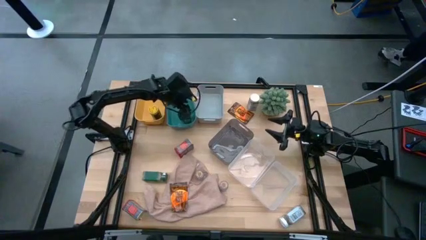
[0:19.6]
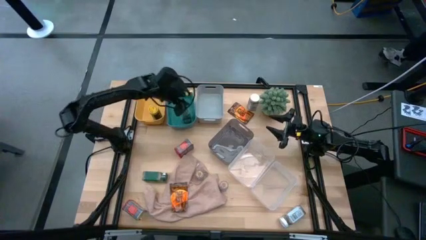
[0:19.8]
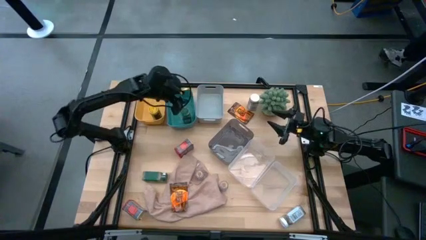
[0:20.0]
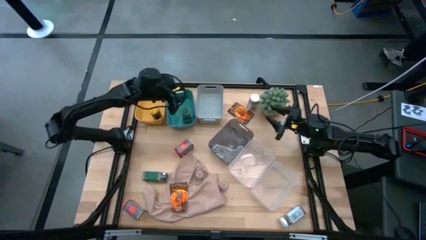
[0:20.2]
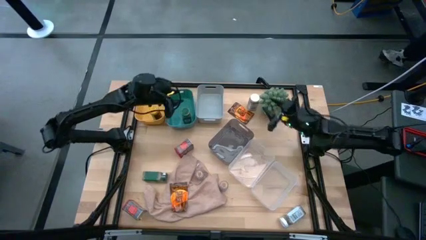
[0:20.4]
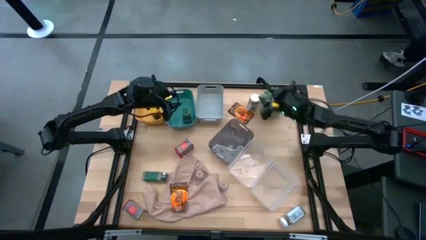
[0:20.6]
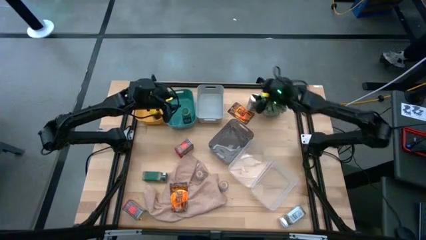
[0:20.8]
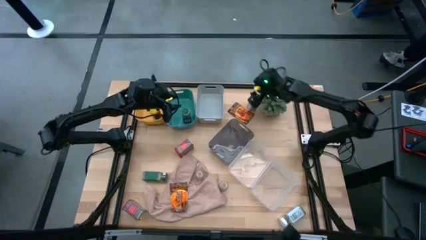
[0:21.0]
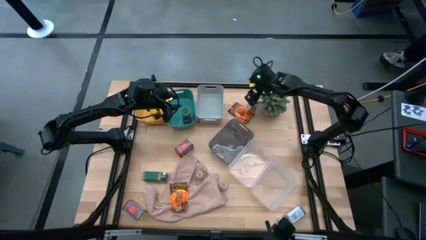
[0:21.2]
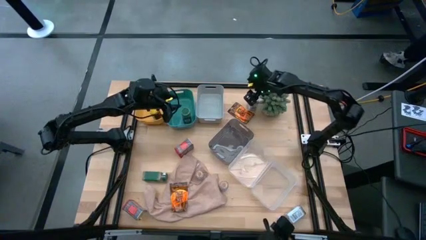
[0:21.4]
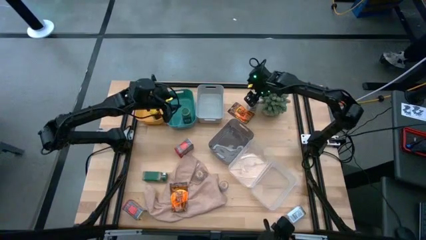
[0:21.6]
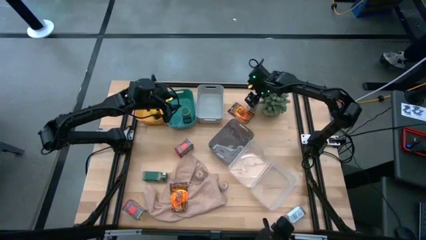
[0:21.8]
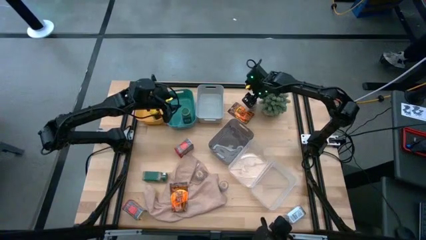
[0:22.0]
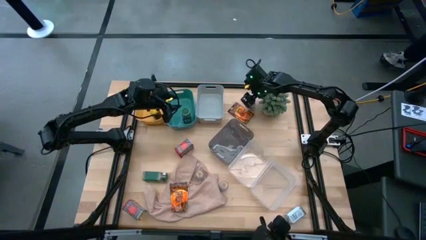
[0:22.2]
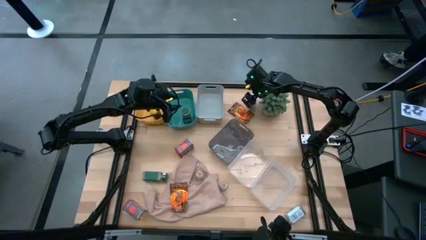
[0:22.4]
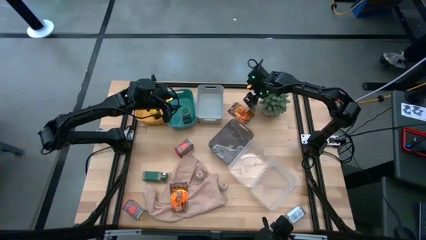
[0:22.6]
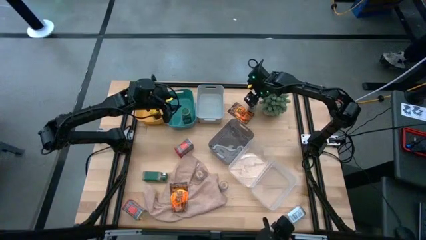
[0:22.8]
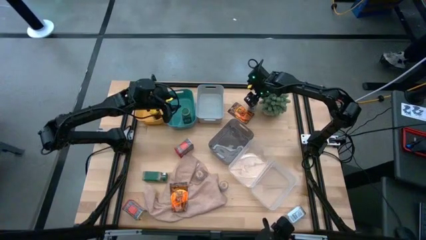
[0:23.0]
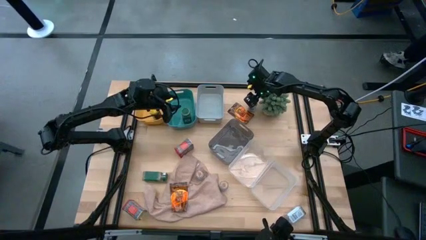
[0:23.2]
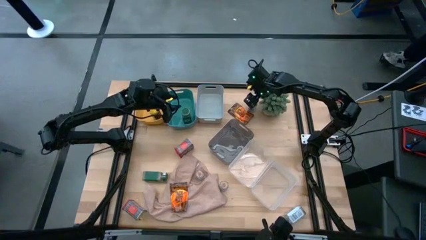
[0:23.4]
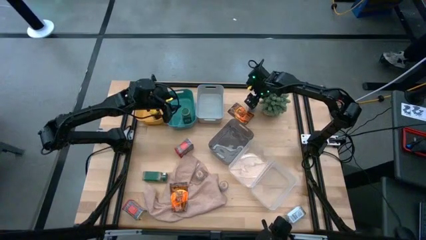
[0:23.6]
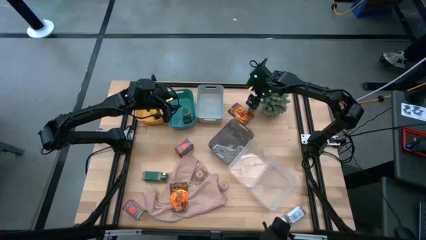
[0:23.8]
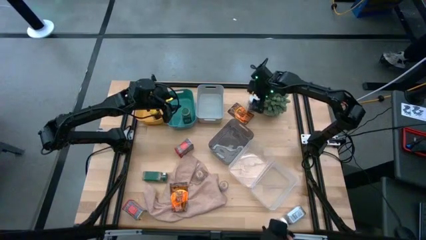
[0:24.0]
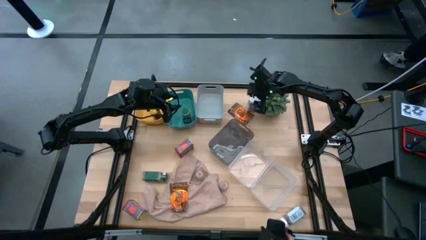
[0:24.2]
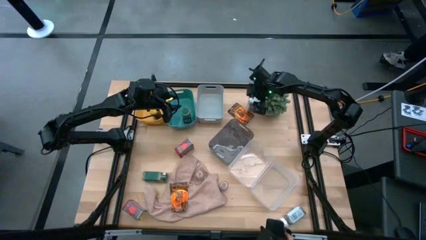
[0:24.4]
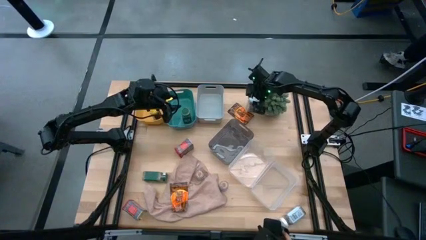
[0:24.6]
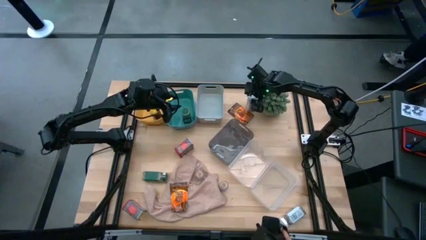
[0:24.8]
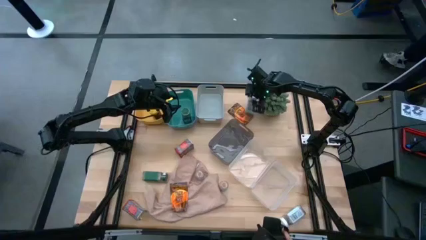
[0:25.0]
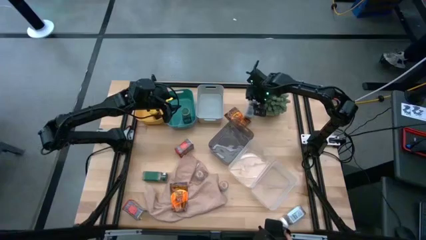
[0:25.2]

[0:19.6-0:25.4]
Task: Sort spices by type
Put the top white seasoning bottle into the gray bin

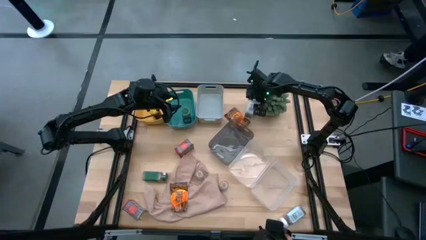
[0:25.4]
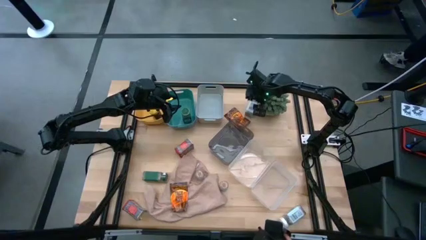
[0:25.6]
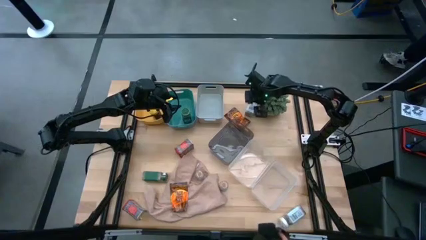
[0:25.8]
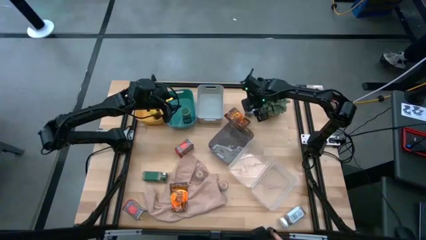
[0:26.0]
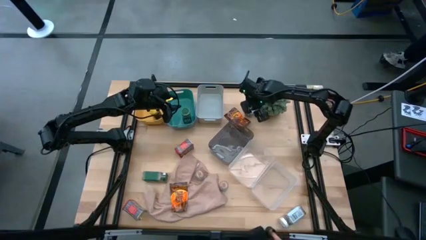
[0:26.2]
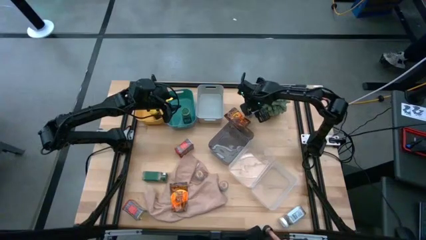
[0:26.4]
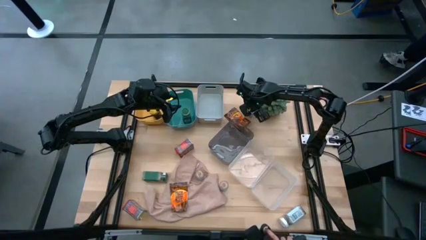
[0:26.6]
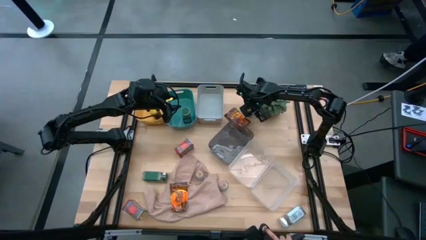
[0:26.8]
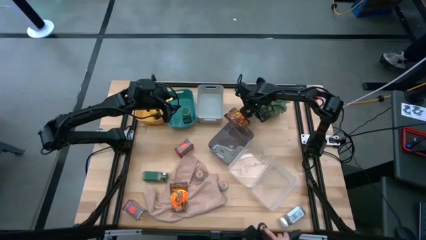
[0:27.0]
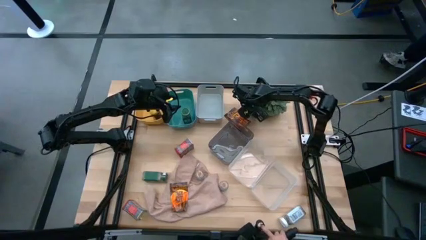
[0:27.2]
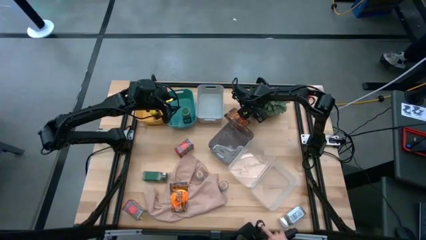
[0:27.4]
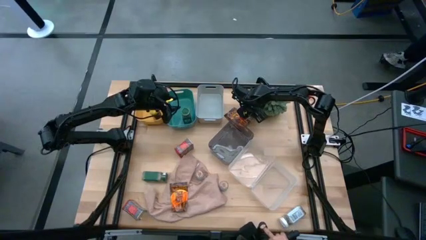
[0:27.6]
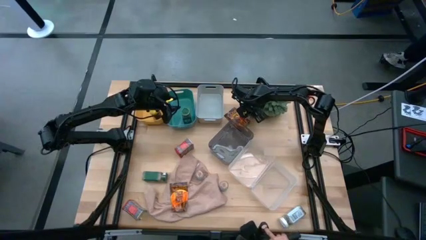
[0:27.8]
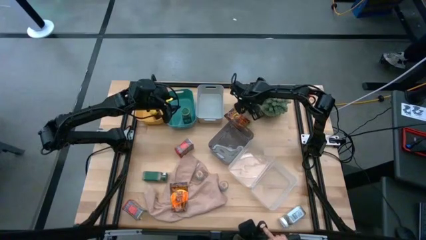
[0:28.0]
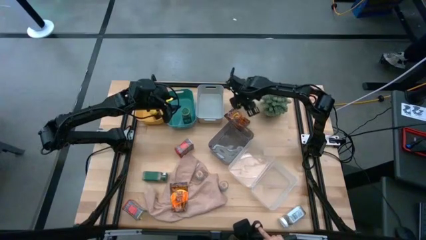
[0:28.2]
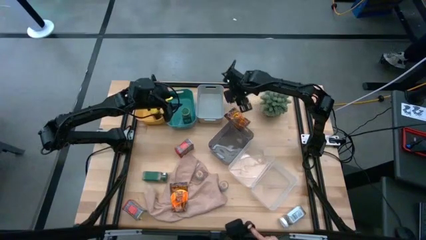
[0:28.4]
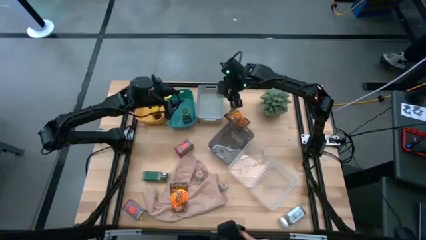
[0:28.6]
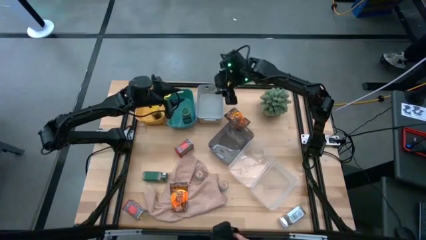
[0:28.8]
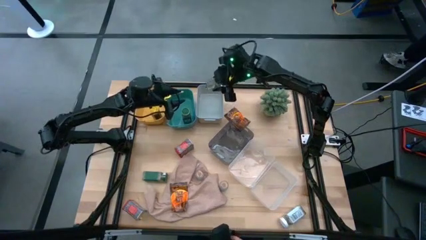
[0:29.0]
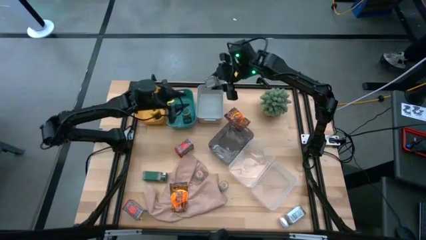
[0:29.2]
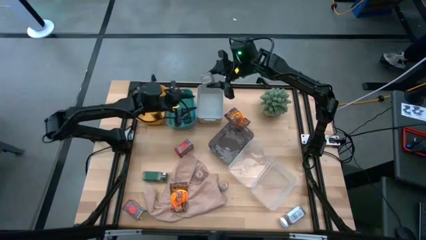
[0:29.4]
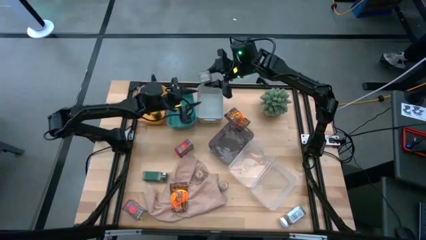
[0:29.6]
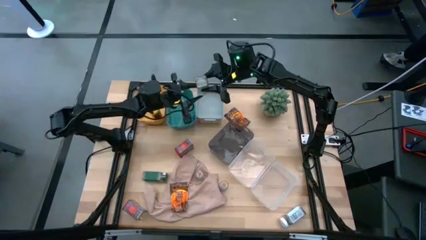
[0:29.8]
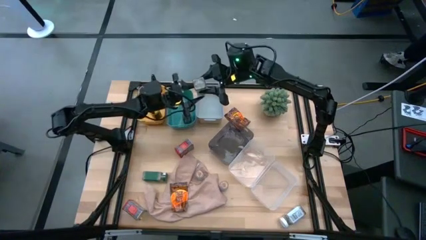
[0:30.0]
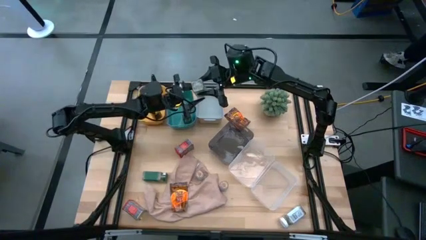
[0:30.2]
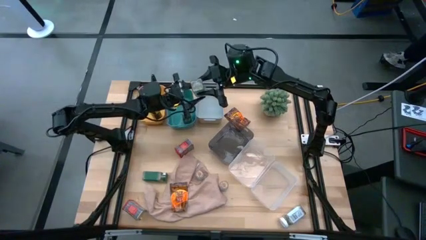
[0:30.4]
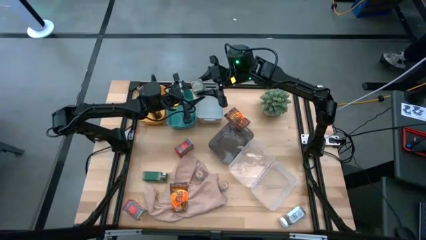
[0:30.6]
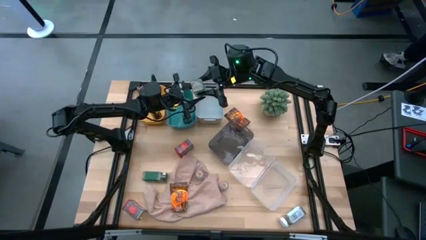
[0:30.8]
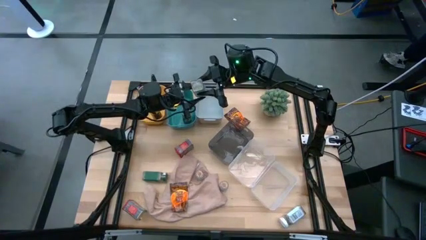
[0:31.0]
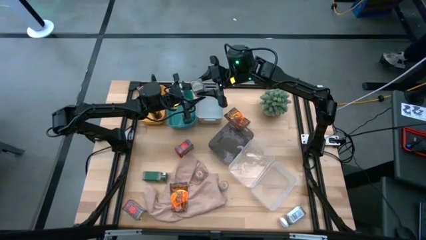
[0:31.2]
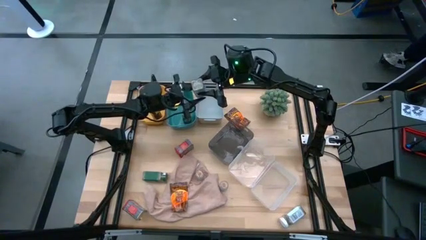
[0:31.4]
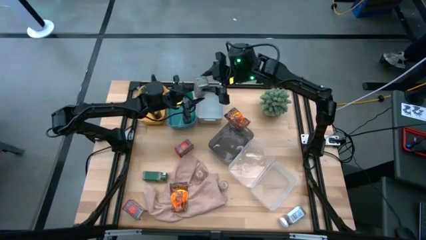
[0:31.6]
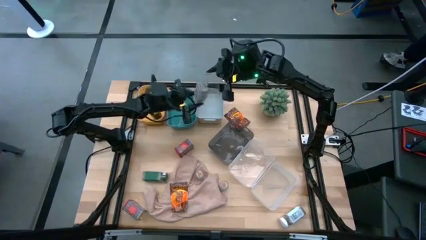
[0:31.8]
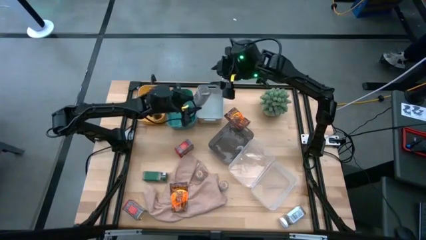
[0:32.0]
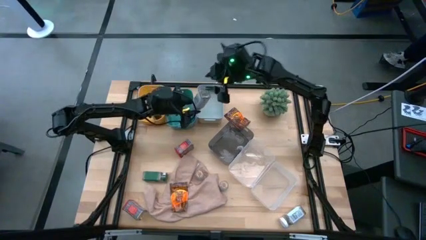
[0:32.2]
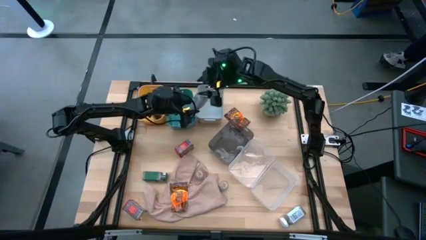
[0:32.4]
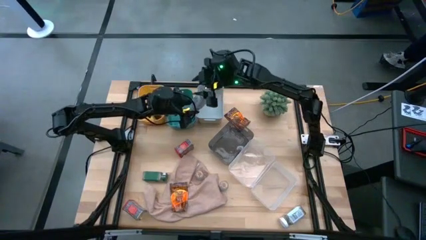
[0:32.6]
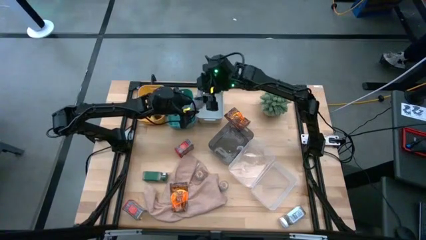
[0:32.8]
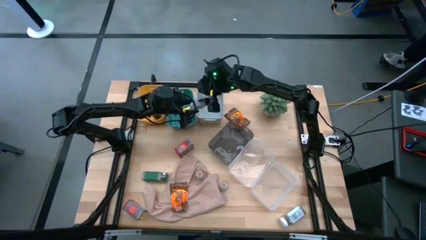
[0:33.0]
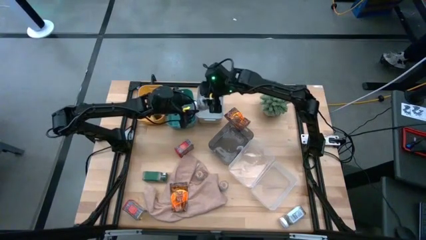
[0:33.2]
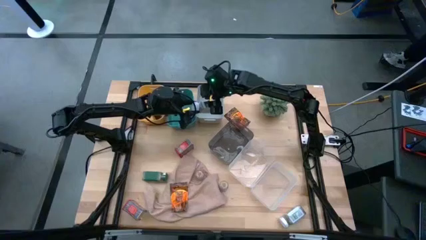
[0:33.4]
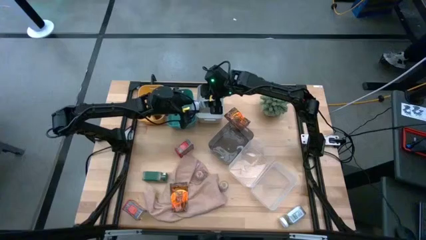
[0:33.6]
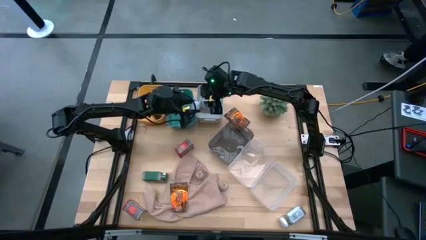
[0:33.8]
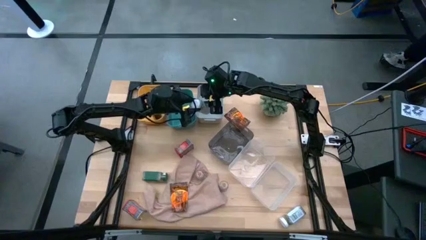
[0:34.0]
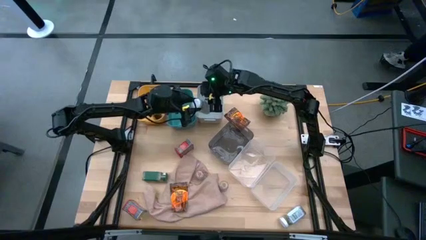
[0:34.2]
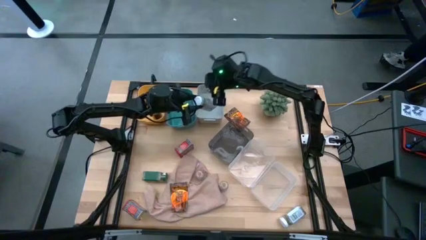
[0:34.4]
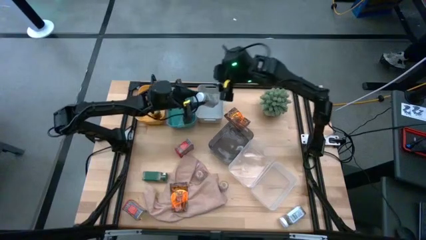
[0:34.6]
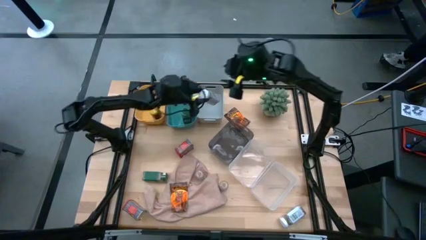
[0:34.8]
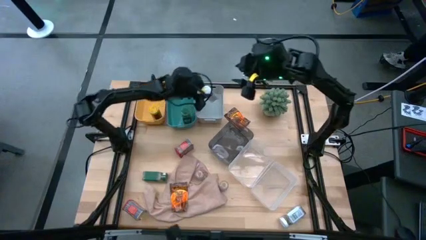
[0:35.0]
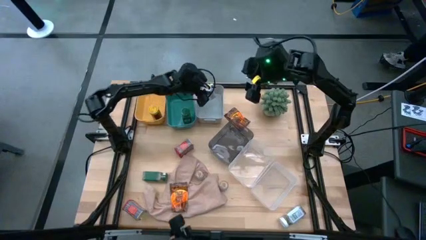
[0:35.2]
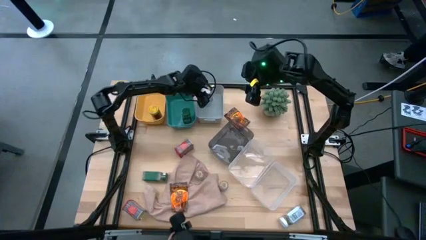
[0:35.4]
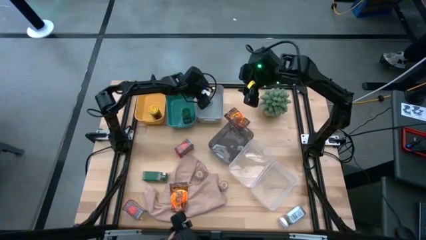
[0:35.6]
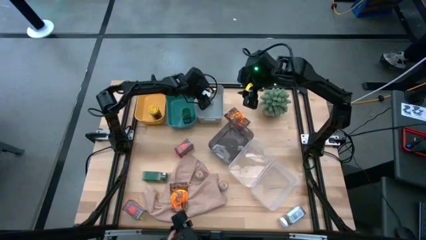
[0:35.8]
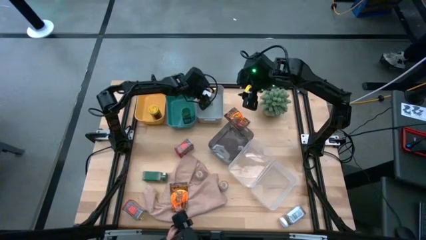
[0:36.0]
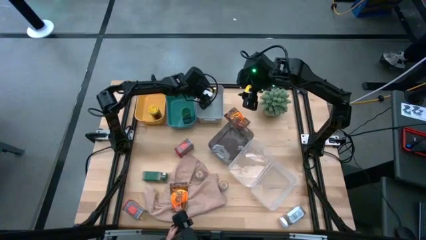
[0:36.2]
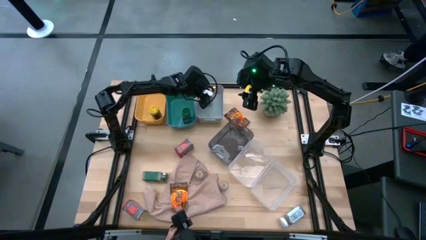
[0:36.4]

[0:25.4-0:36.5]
Put the top white seasoning bottle into the gray bin
